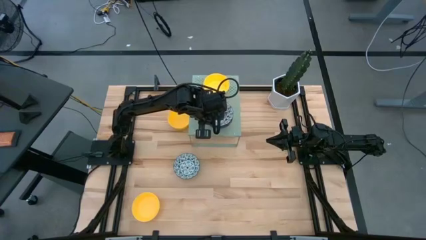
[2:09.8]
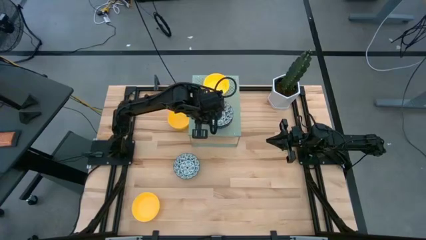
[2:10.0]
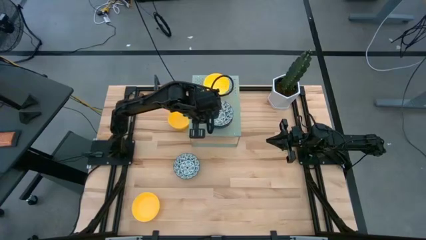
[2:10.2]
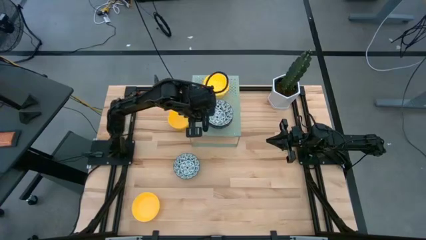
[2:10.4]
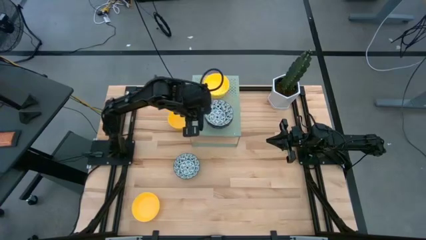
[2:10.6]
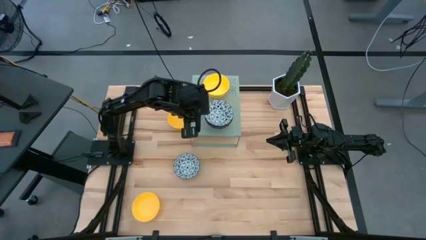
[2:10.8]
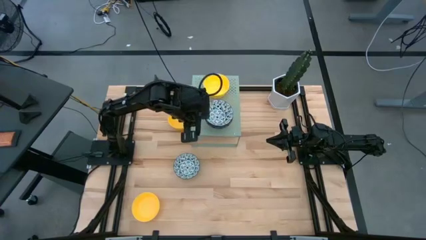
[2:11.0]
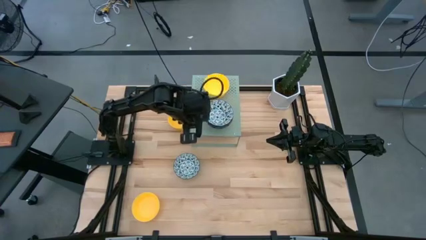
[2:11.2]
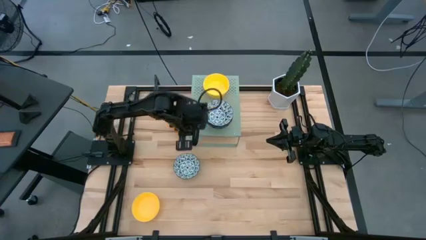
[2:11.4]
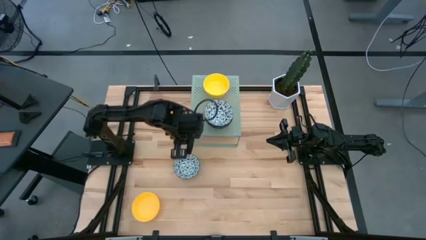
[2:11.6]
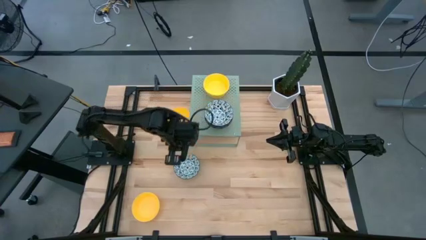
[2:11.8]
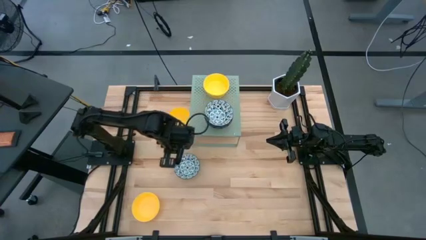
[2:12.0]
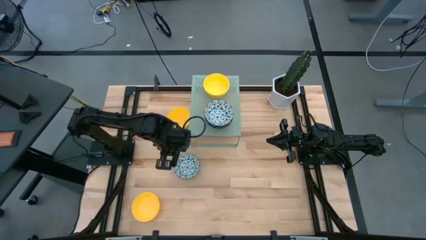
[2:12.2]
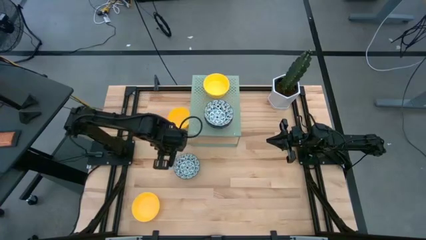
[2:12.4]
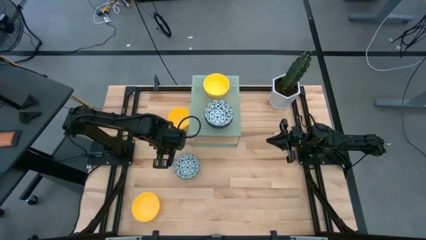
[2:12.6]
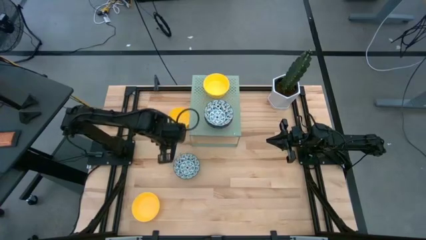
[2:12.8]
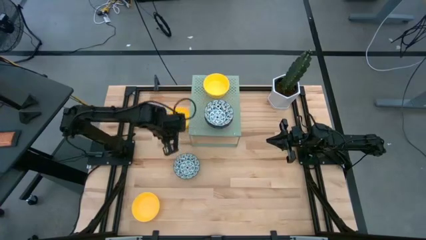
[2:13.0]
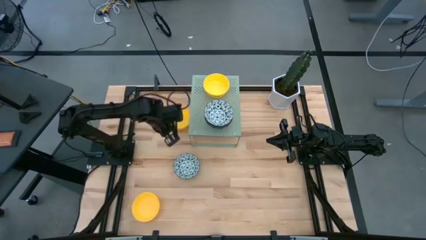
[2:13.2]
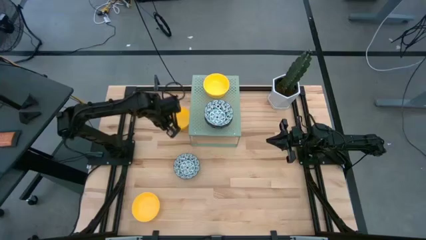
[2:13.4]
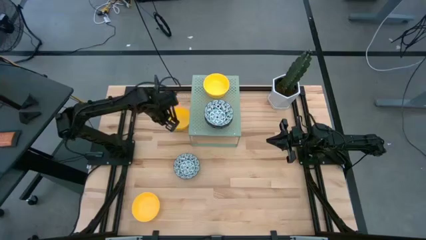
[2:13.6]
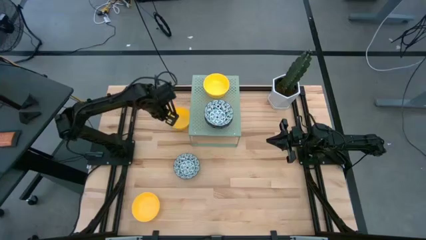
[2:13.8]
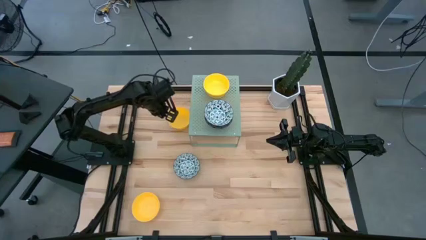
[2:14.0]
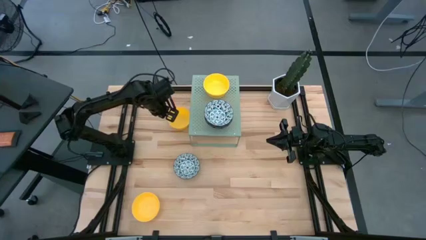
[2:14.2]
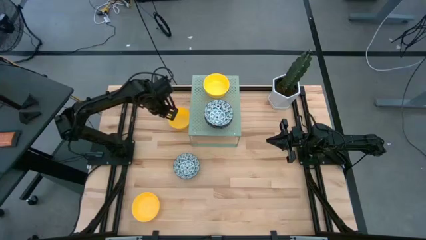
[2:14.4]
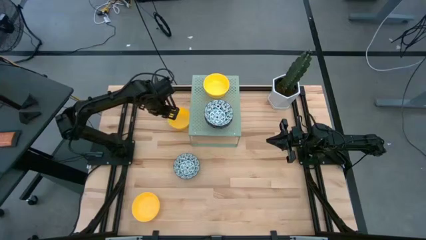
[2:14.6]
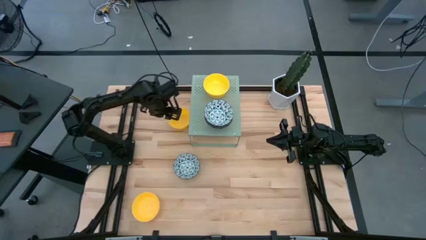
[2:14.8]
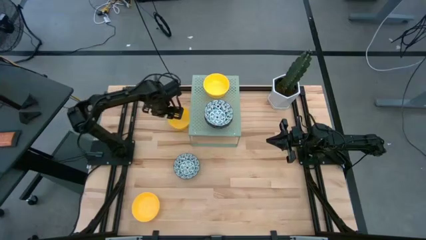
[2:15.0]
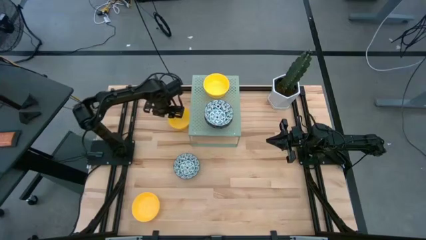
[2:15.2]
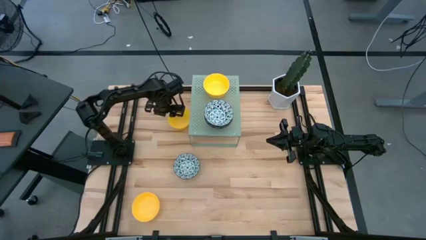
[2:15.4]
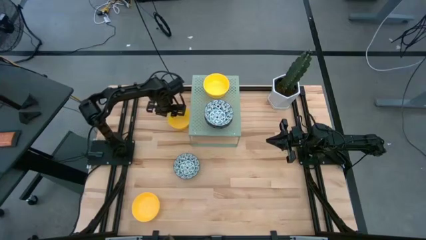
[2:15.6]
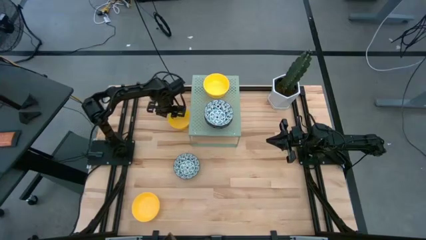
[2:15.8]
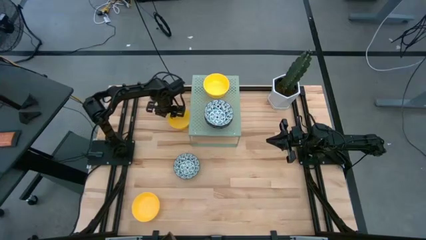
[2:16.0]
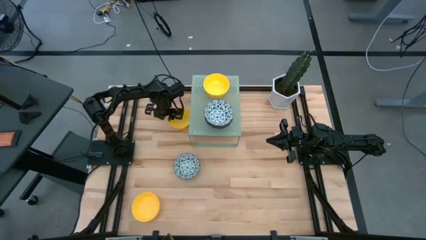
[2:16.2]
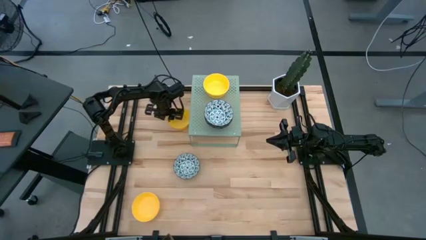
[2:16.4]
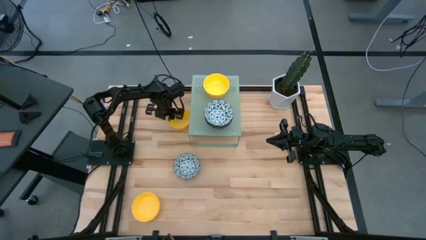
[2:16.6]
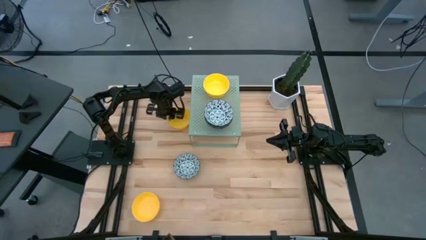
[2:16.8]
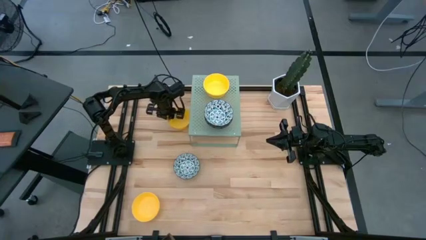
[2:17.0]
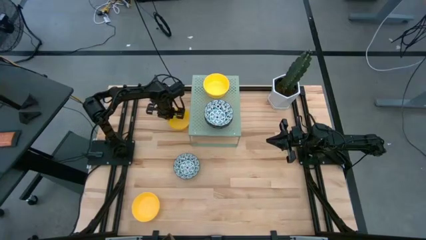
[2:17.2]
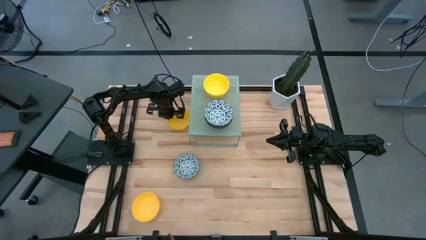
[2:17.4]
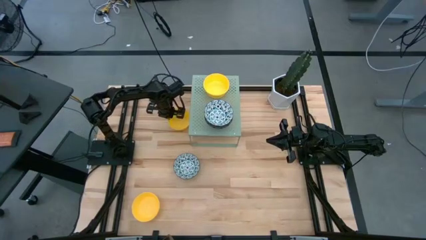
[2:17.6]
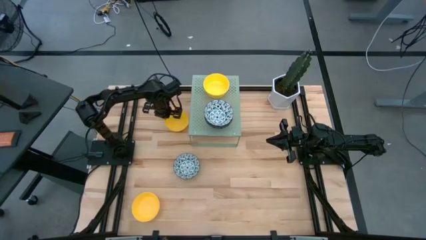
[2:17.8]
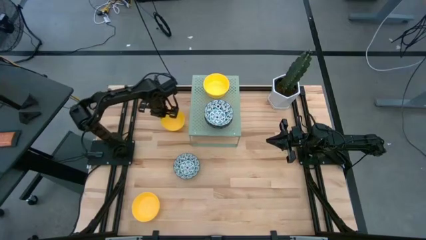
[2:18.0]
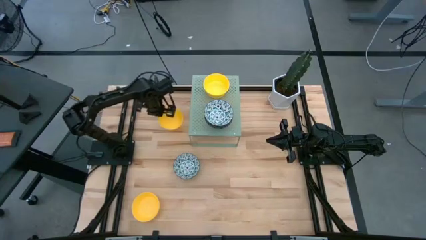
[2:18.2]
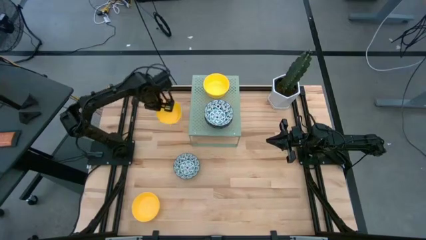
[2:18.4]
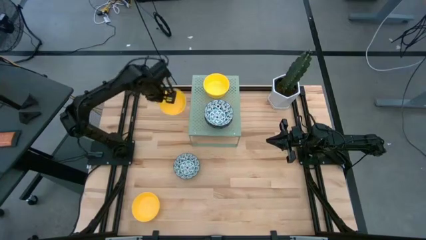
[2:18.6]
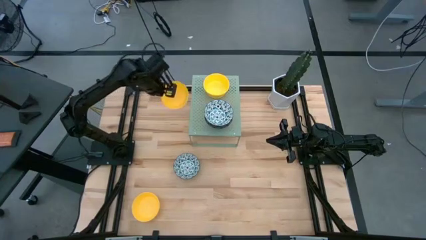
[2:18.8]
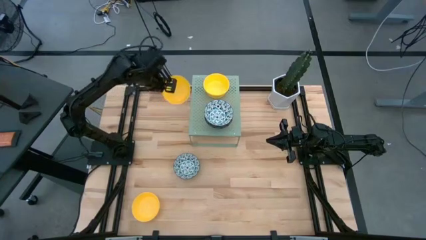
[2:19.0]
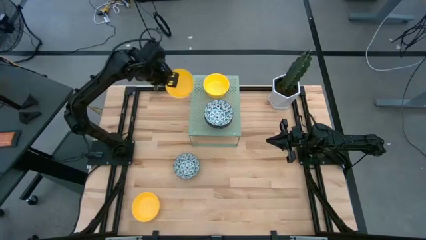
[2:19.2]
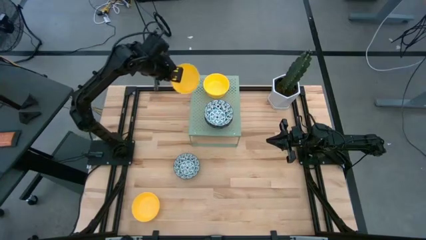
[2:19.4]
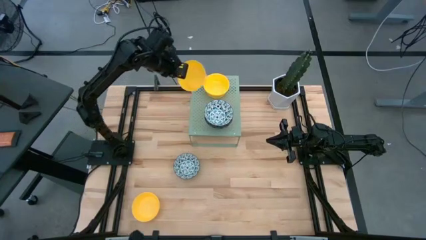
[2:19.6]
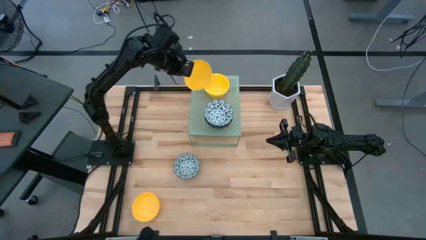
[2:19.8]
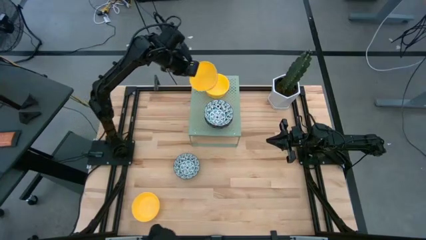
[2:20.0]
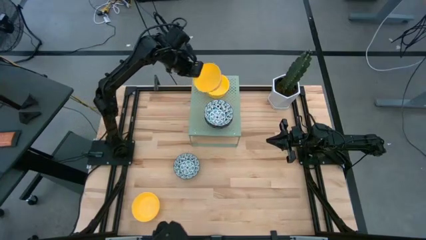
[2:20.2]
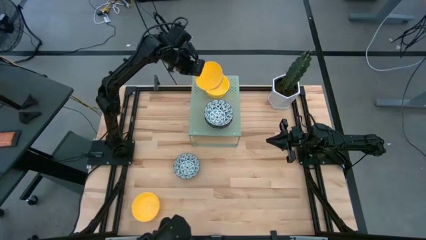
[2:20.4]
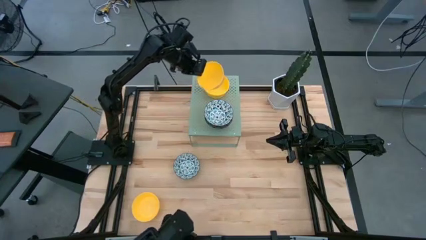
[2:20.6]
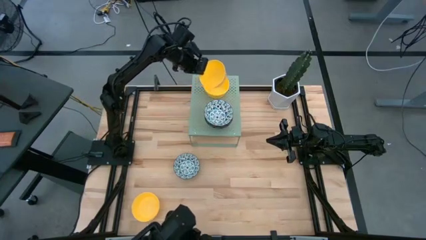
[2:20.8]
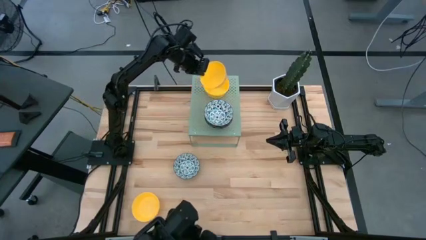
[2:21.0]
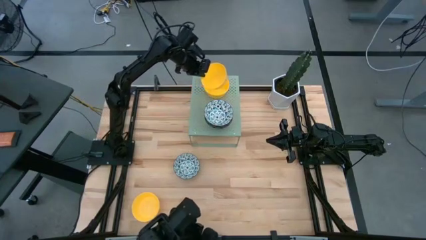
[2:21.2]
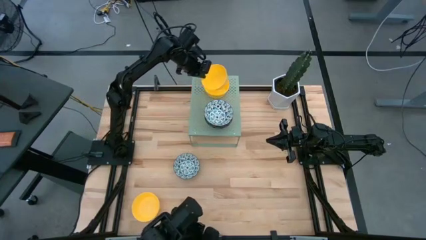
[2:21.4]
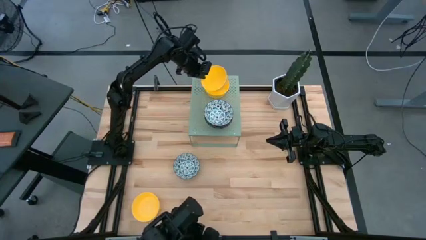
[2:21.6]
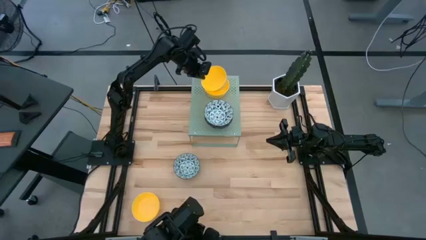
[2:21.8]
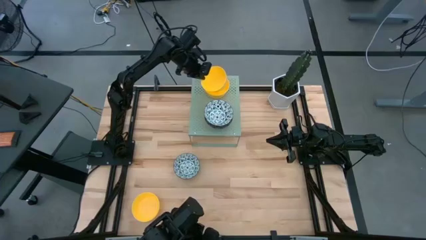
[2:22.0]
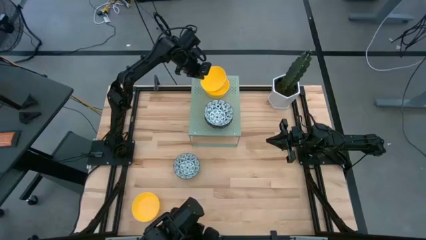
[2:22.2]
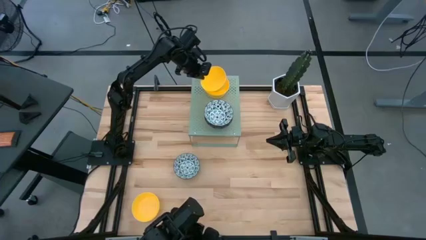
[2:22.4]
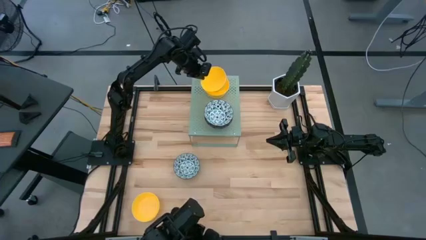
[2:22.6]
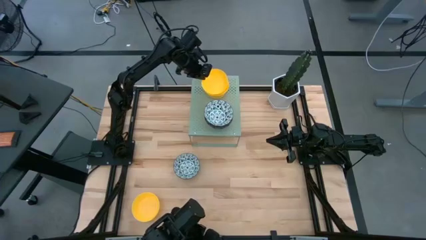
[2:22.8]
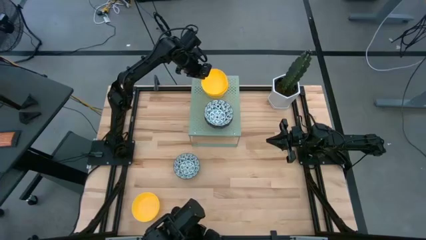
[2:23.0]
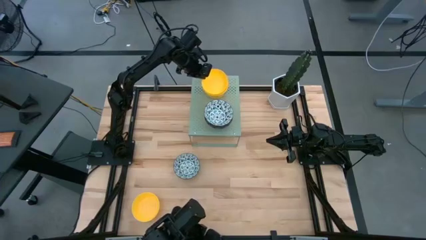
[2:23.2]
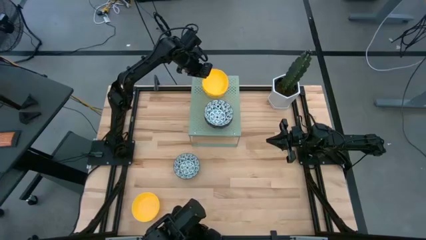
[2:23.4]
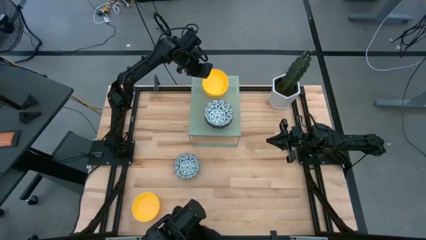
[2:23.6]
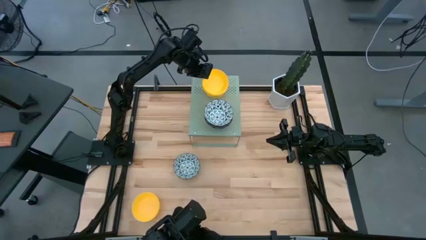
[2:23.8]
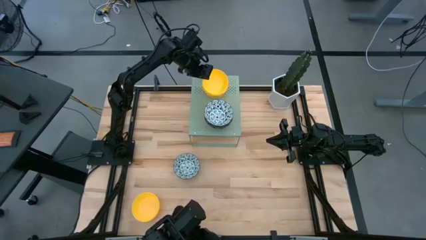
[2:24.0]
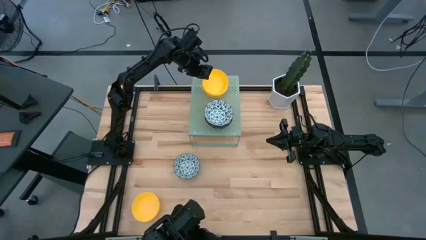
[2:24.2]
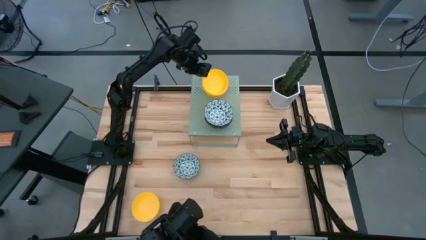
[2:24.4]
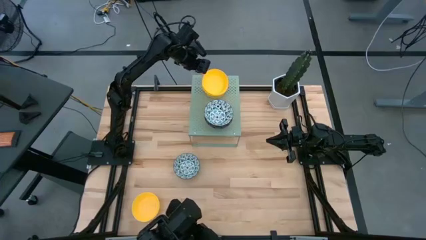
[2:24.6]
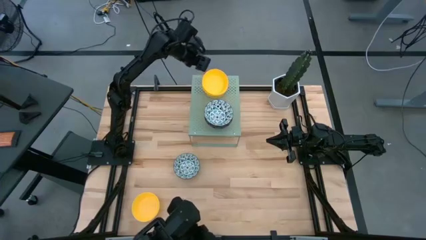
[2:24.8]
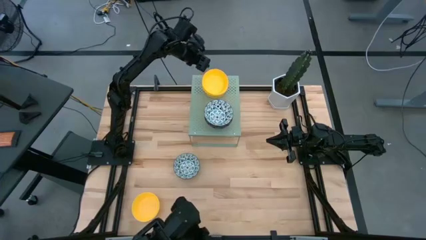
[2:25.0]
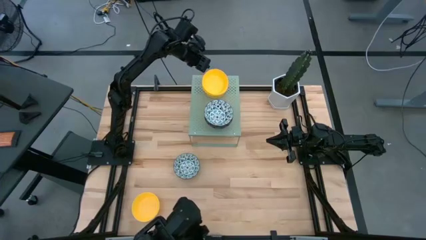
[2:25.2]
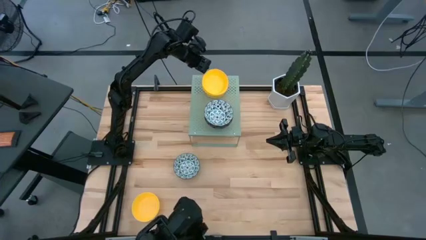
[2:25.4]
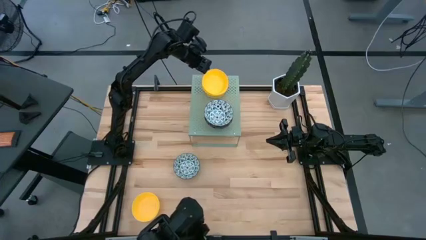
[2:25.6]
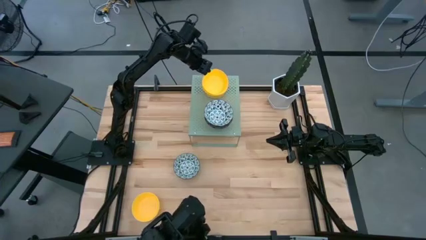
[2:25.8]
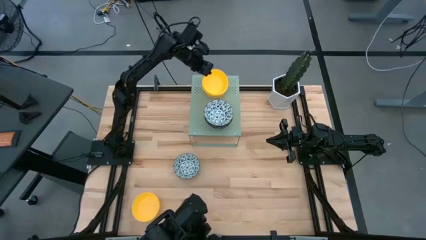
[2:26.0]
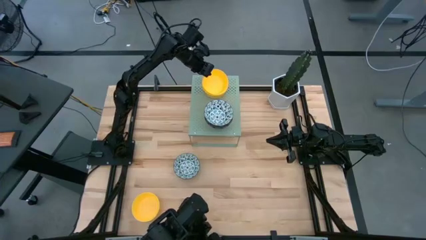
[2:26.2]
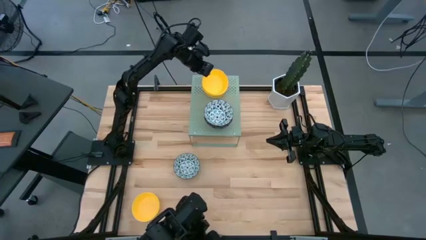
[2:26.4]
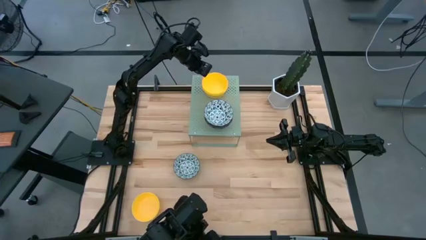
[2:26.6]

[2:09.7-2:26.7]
Task: Pick & Place Mini bowls
Stack the yellow bowl on top of the other yellow bowls on the shelf
